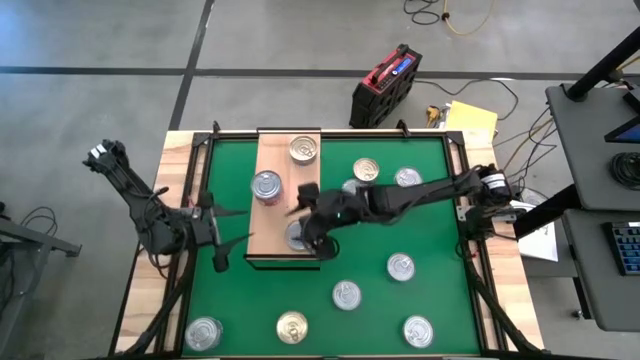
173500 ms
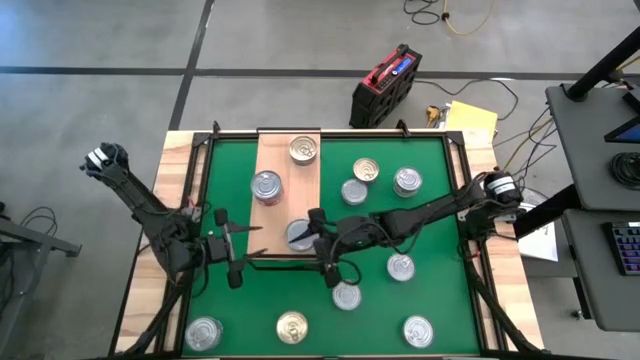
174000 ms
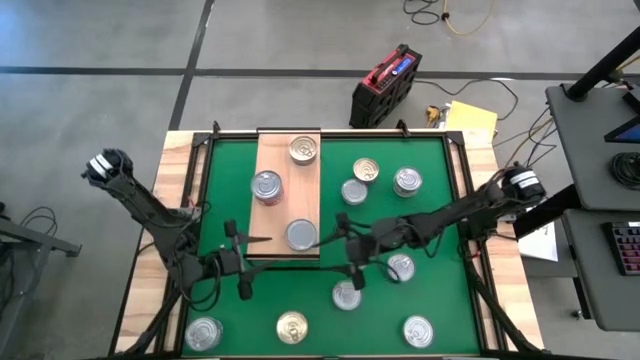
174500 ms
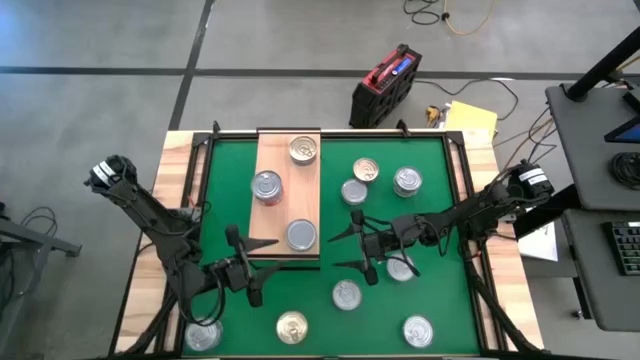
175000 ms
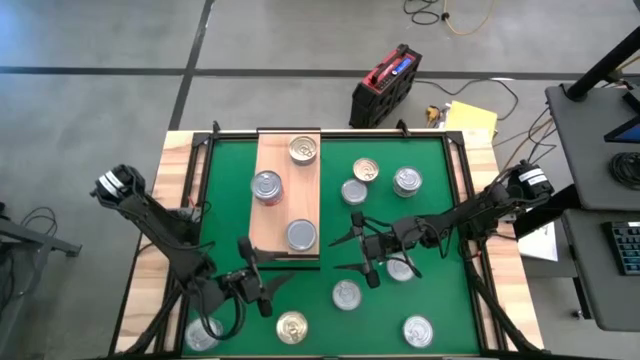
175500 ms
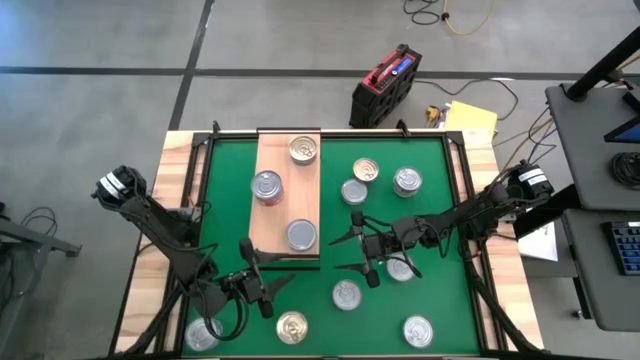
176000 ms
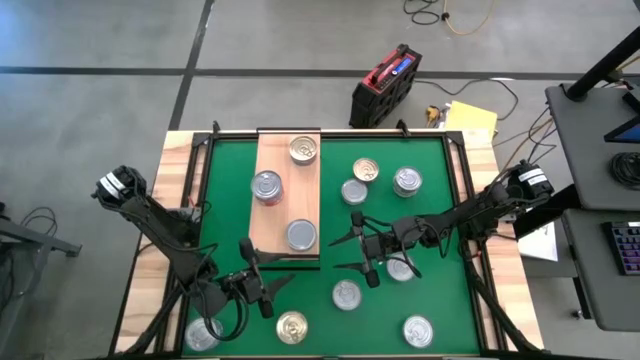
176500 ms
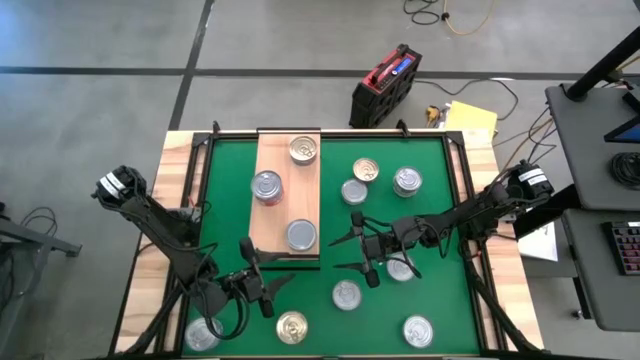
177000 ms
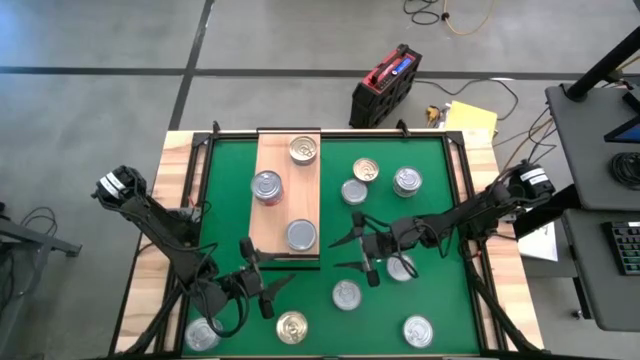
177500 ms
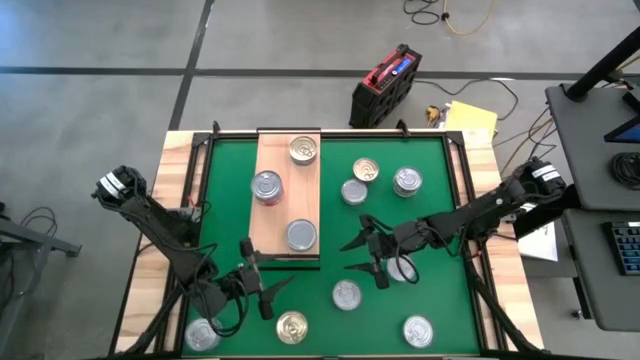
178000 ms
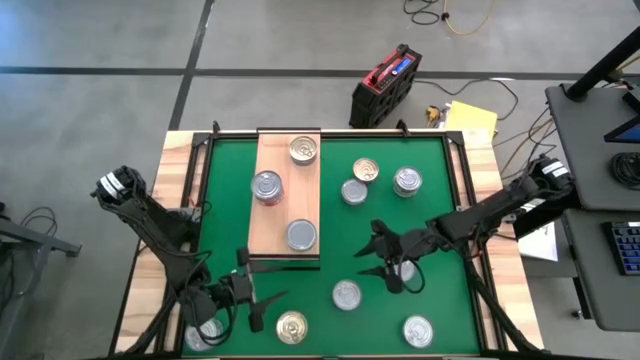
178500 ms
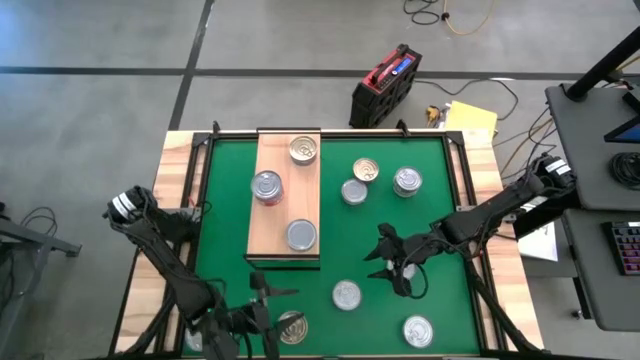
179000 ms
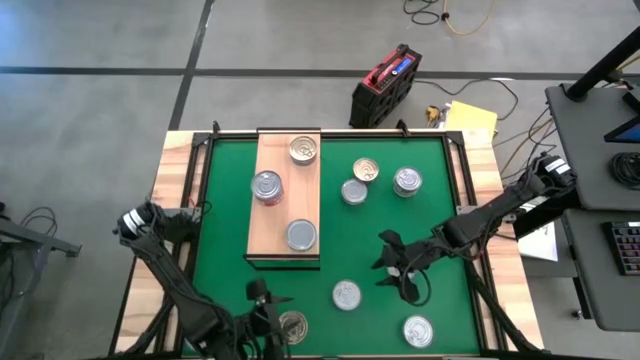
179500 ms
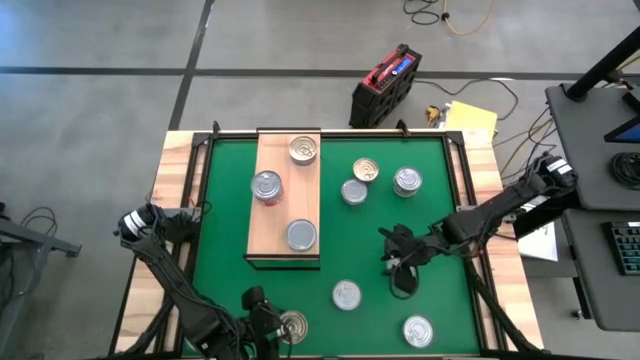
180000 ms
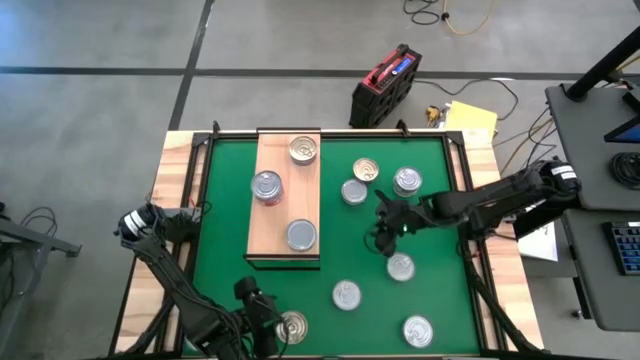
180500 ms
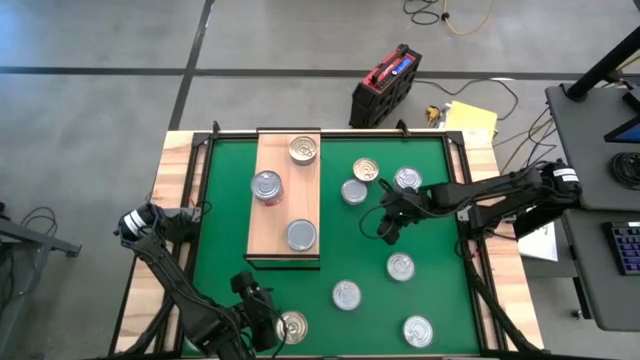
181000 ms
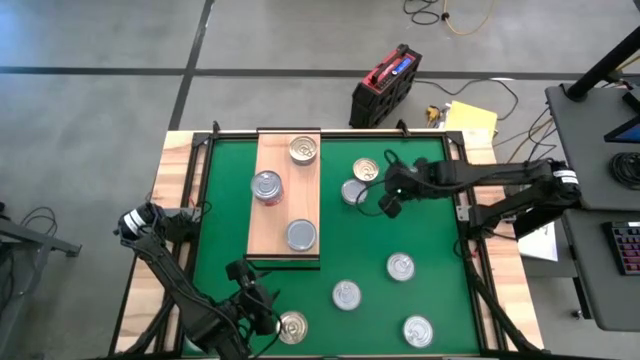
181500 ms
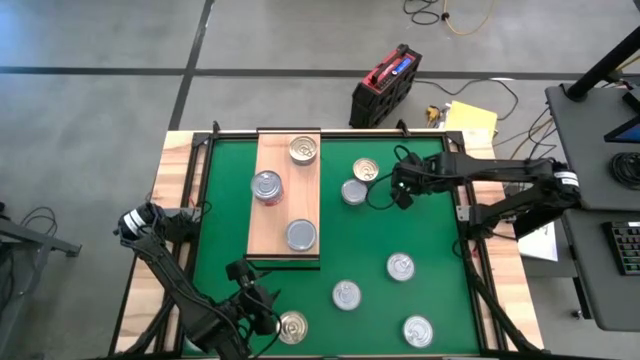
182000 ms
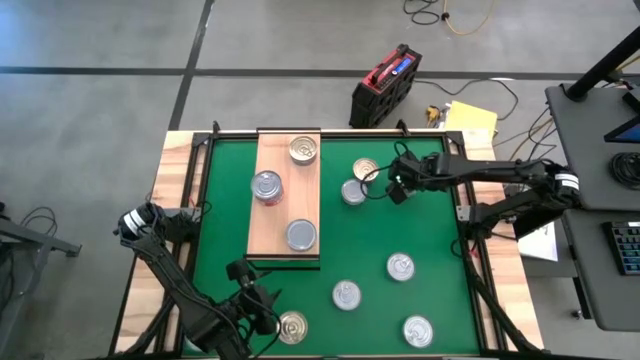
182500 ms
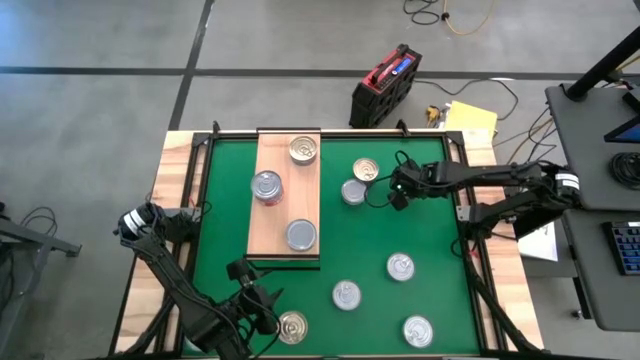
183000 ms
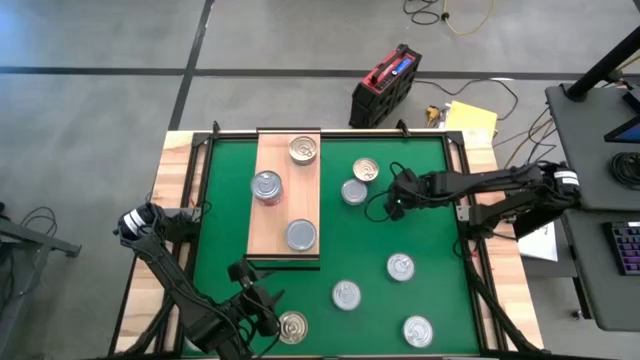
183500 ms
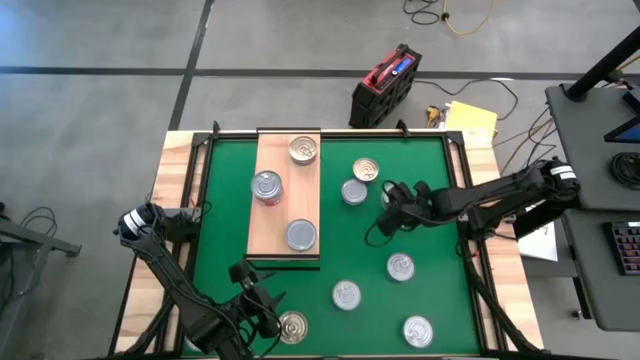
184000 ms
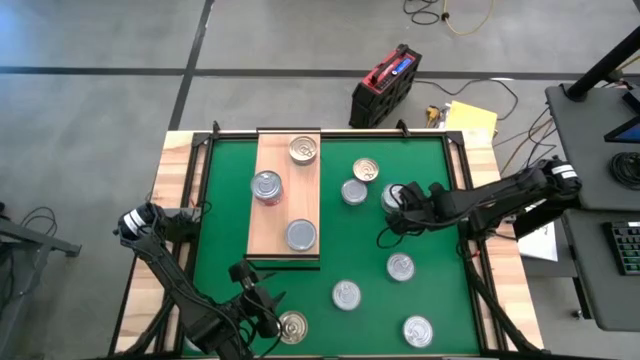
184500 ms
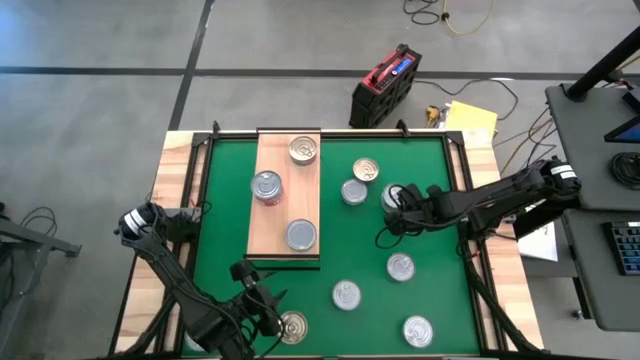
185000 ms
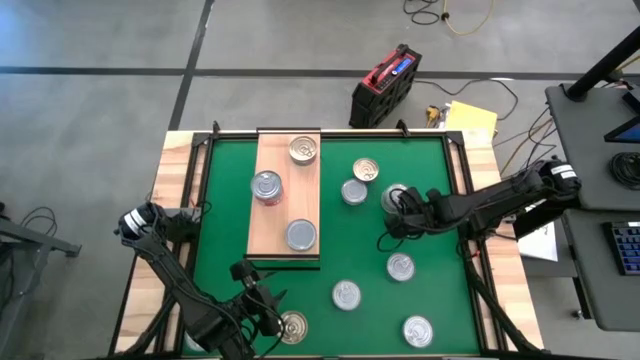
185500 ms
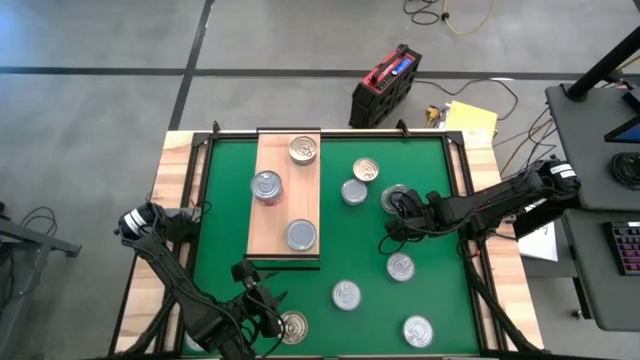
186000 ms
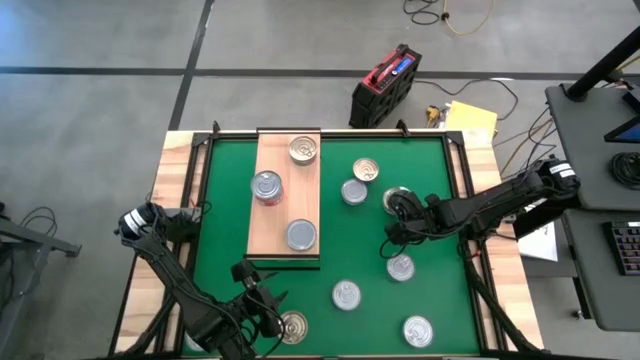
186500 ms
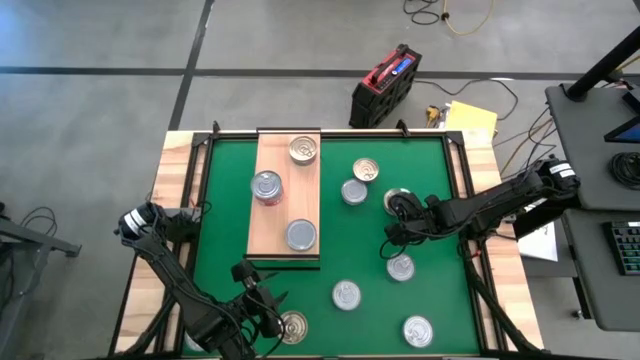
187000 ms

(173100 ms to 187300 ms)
Task: Stack canned seafood by type on shelf
Put the green tuna can on the shelf

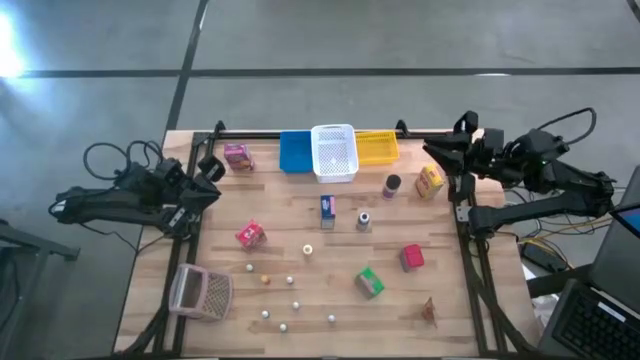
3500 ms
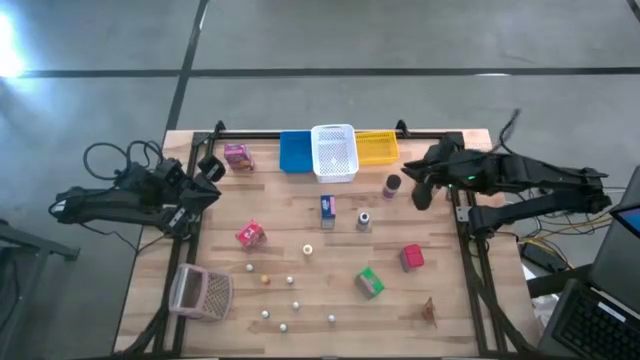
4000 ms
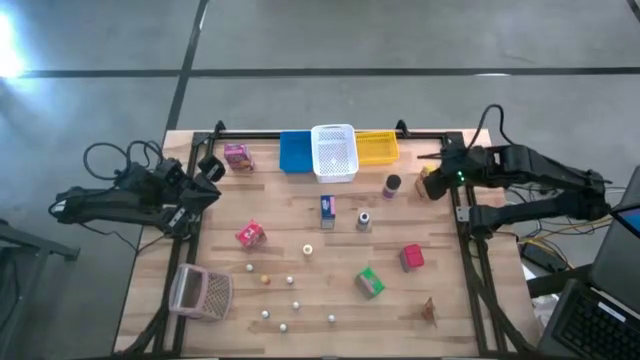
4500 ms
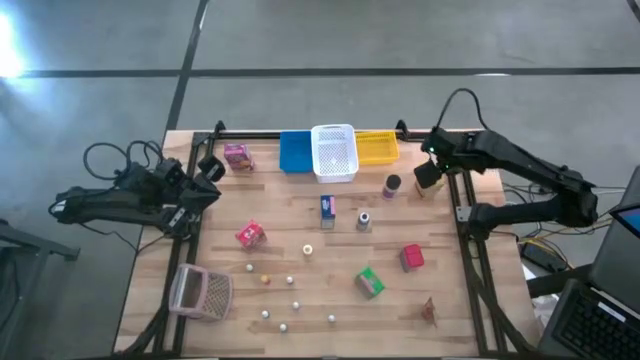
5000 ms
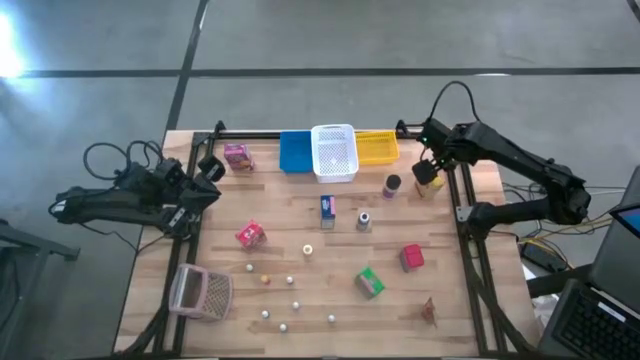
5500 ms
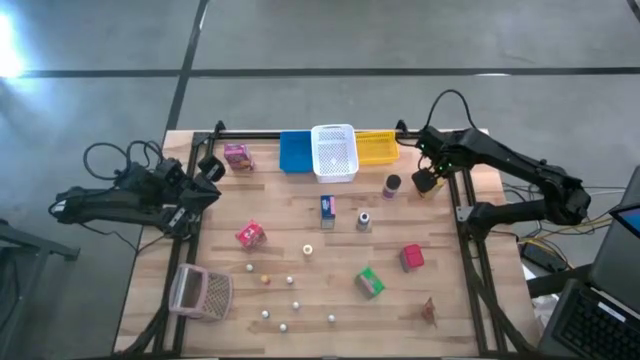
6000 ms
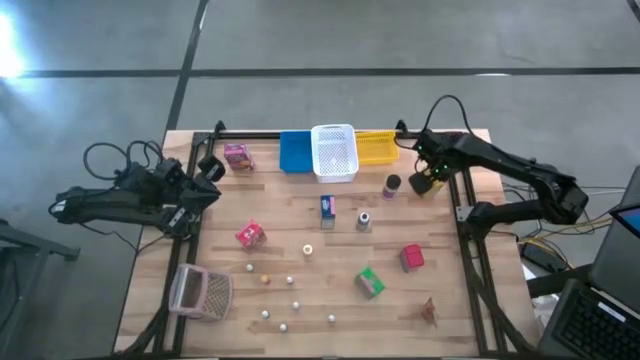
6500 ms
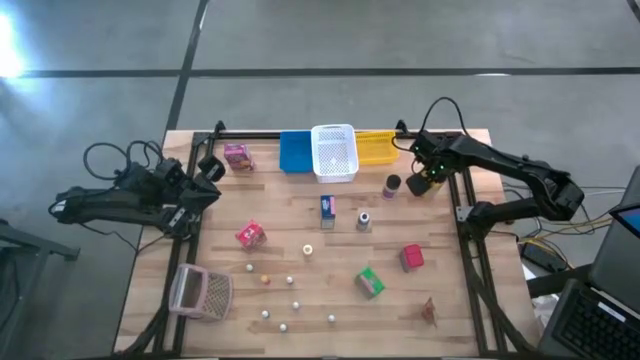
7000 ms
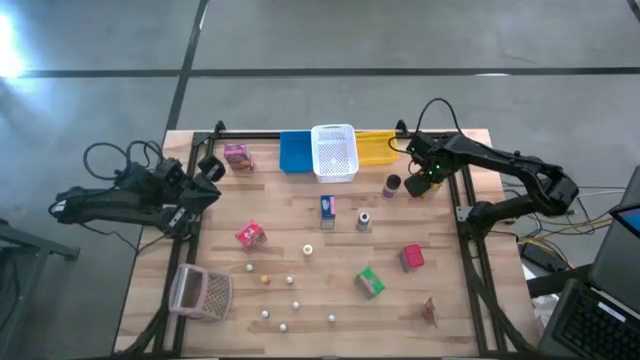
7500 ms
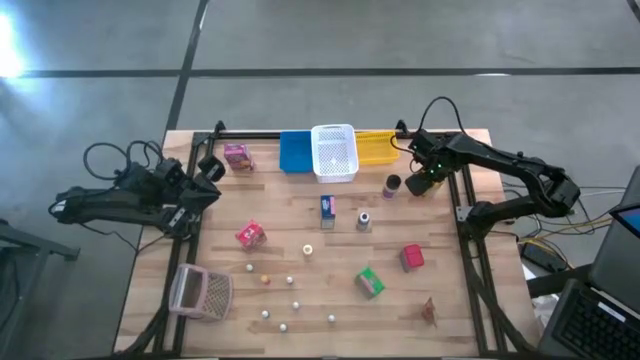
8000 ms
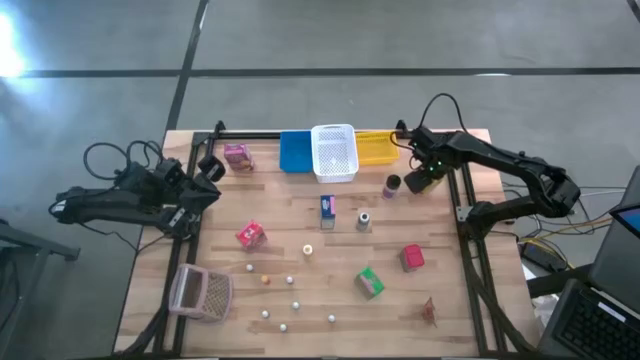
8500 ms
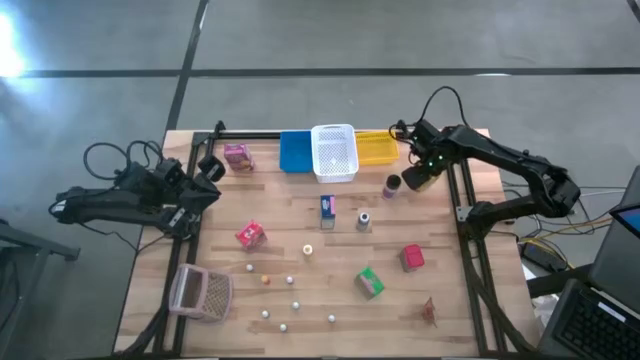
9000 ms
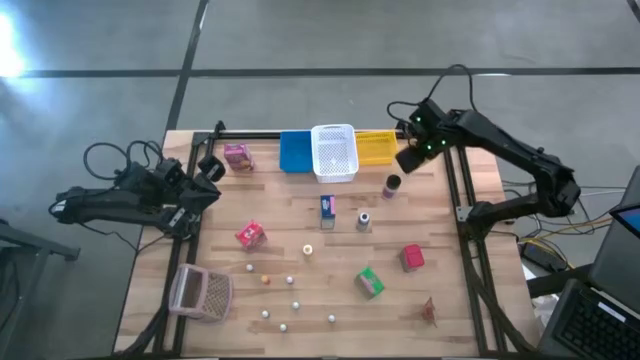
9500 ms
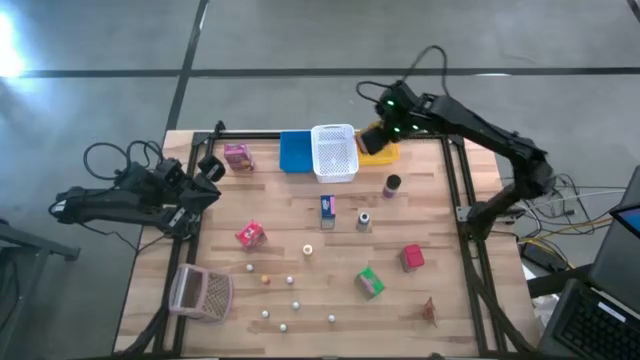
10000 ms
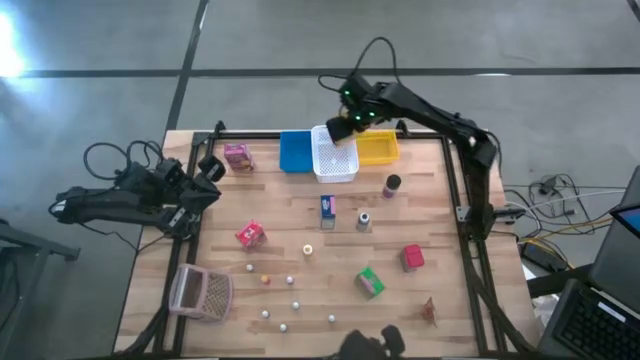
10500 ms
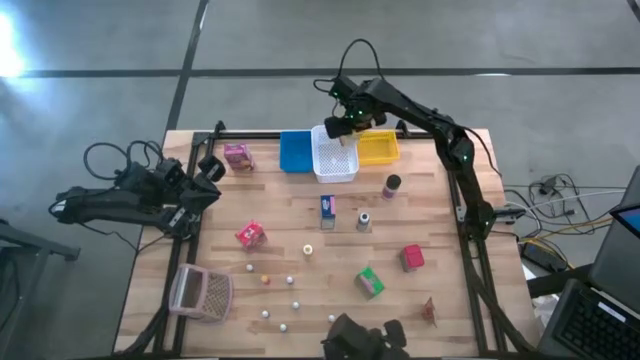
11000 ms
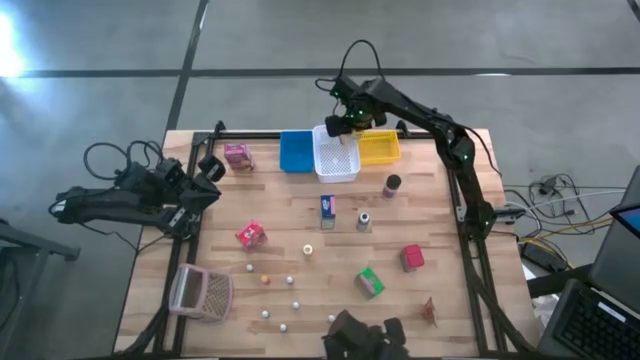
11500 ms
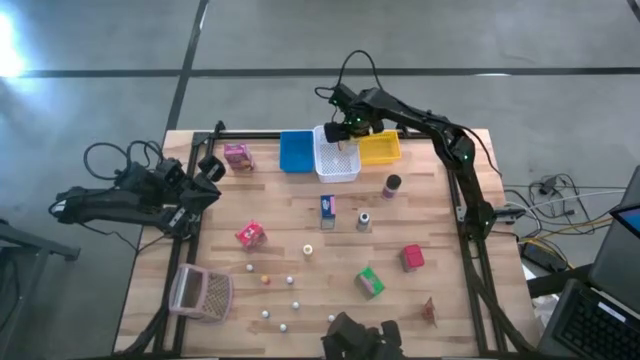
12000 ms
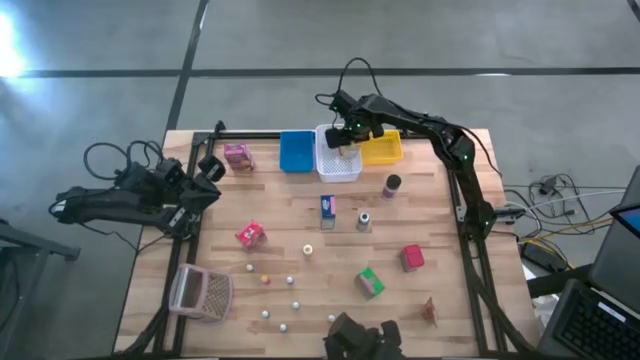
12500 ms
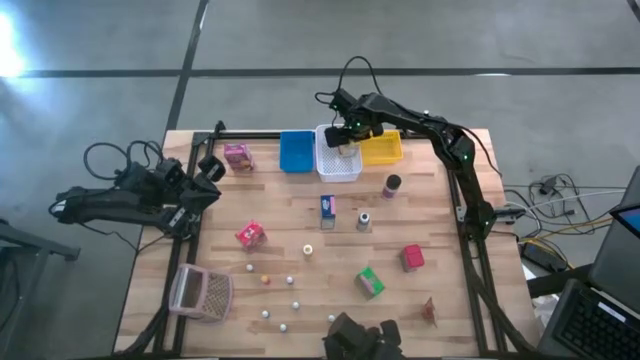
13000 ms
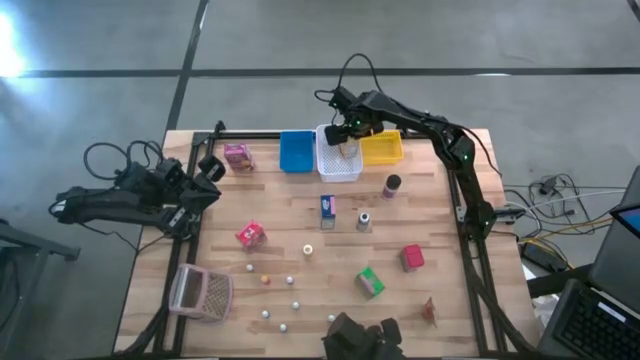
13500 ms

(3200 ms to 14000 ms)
Task: Pick & Place Kitchen Items
Put the yellow cereal box into the white bin
